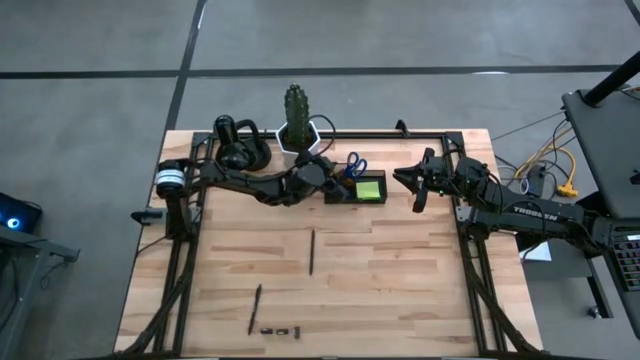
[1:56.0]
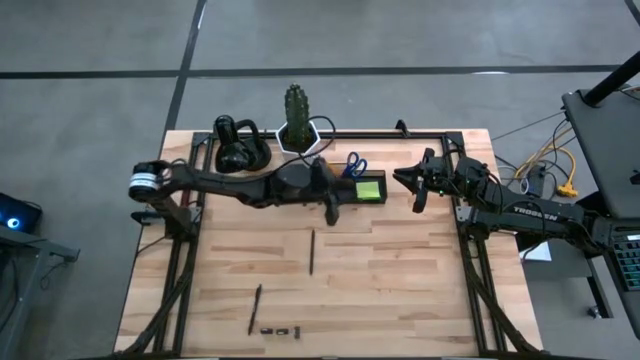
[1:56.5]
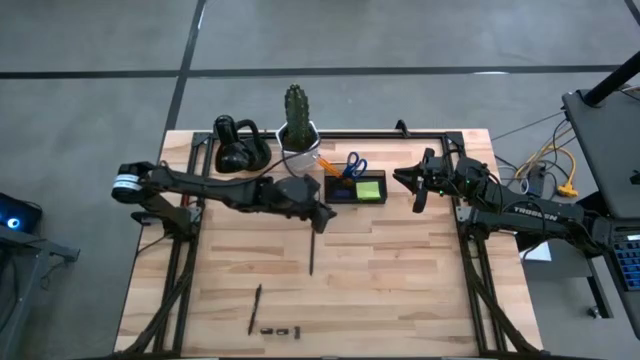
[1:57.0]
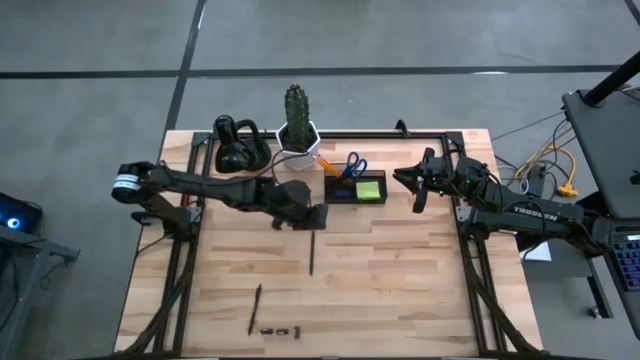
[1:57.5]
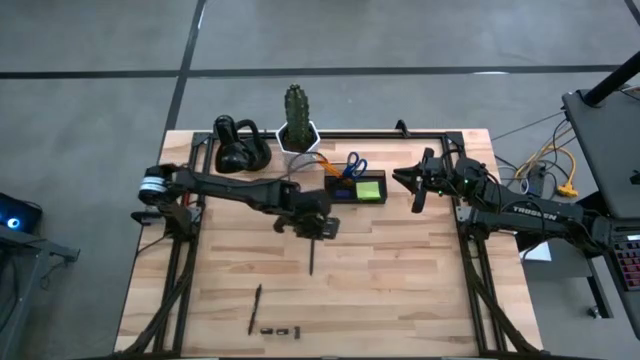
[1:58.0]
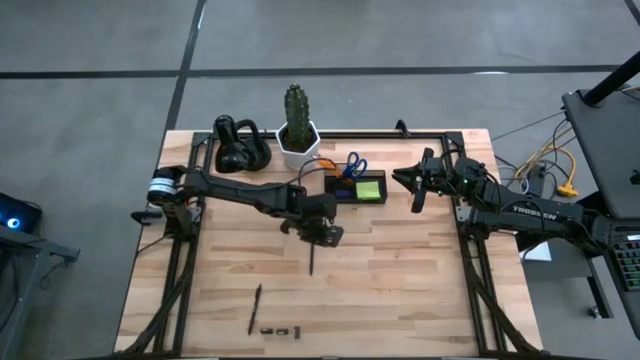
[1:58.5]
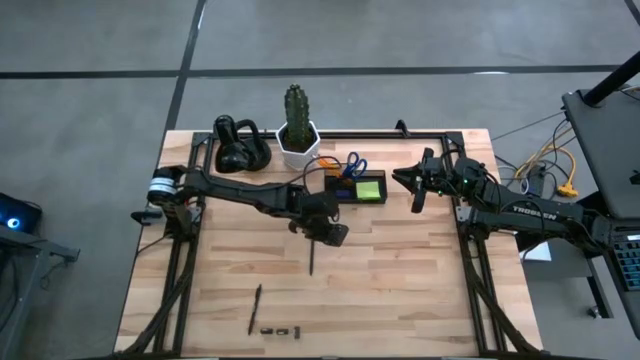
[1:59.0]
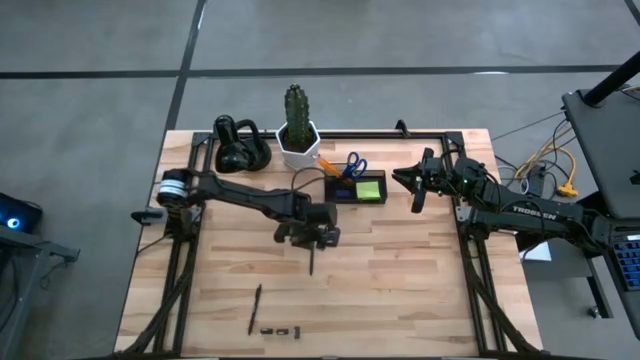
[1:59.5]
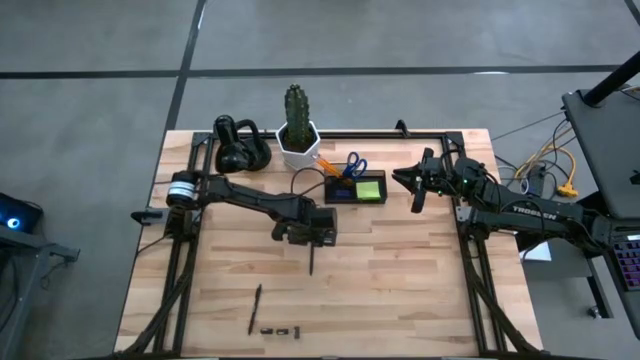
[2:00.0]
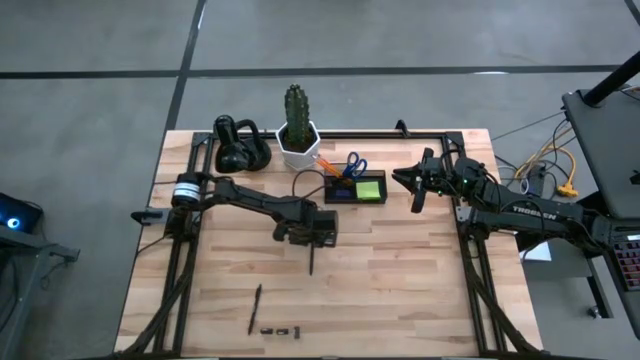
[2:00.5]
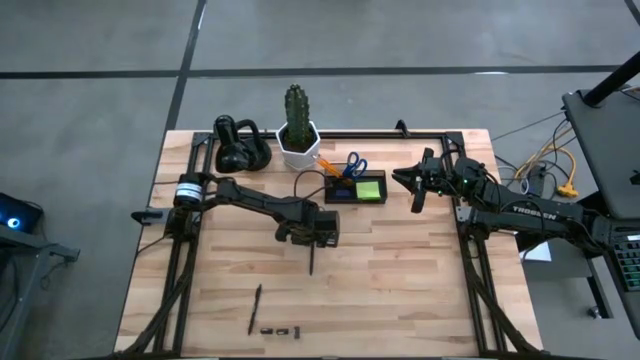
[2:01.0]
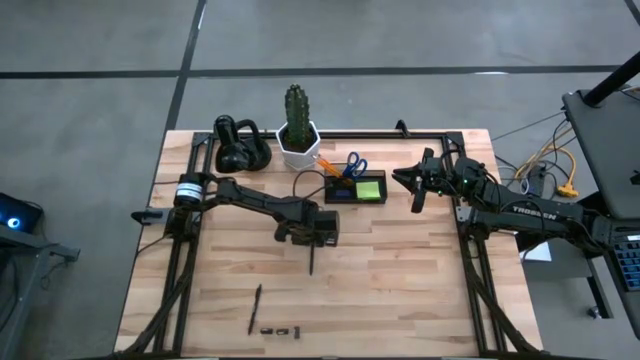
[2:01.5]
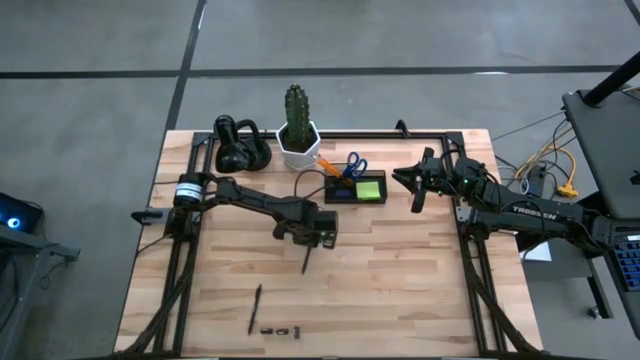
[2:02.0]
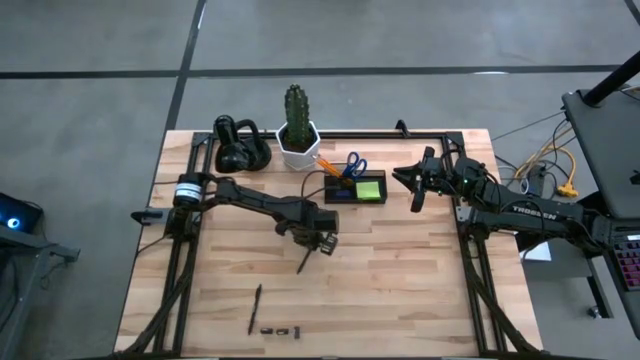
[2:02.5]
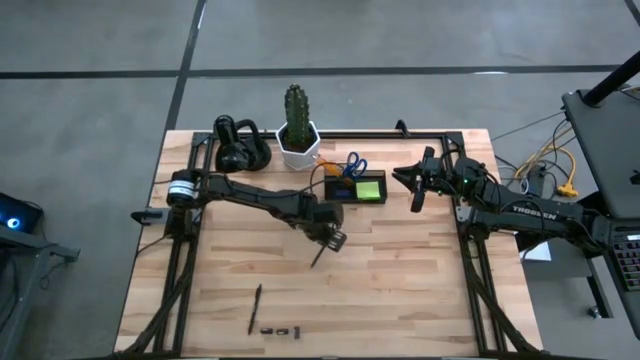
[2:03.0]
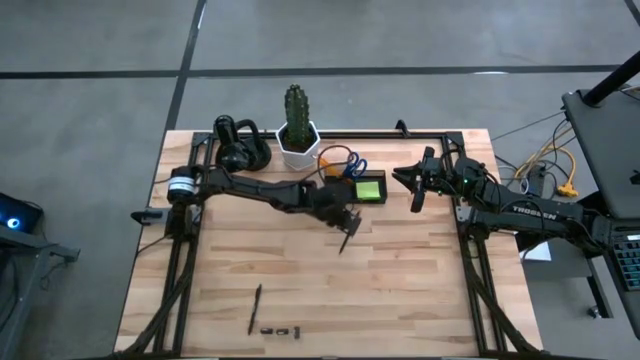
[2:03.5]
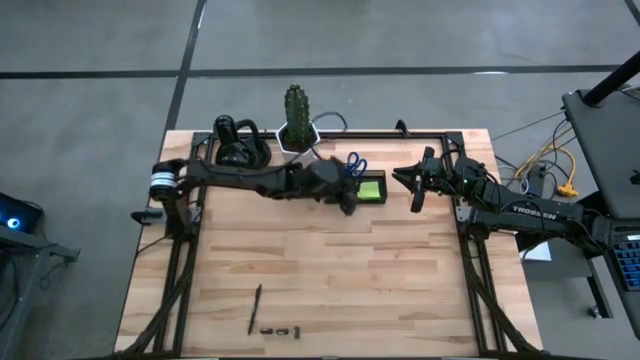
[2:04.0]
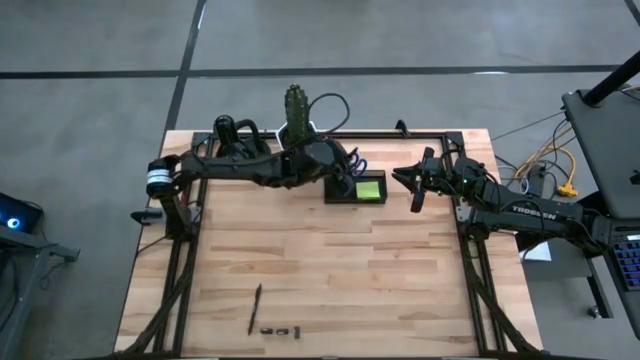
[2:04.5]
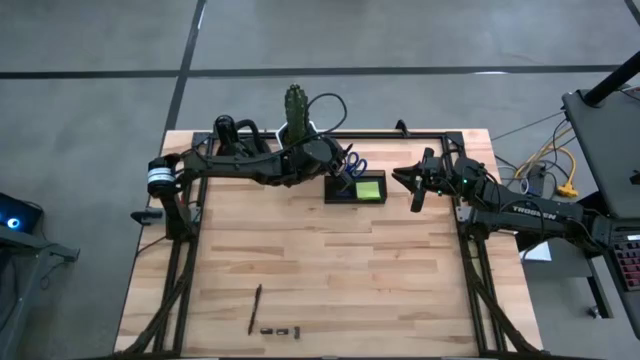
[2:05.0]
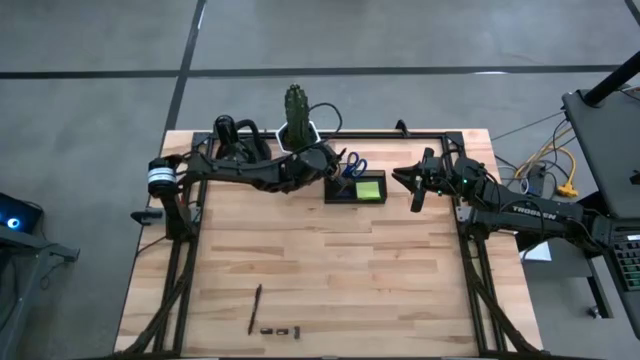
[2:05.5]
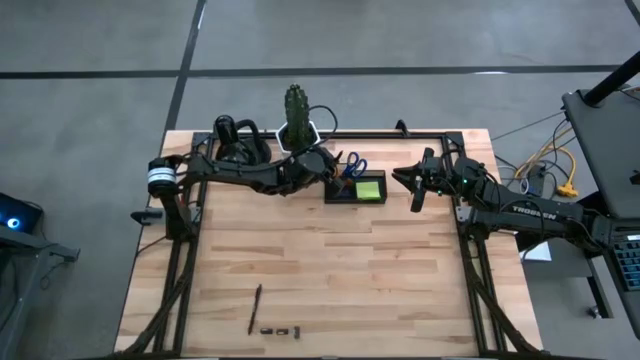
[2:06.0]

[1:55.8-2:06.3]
Task: Pick and place office supplies into organizer
Put the top pen into the left section of the desk organizer

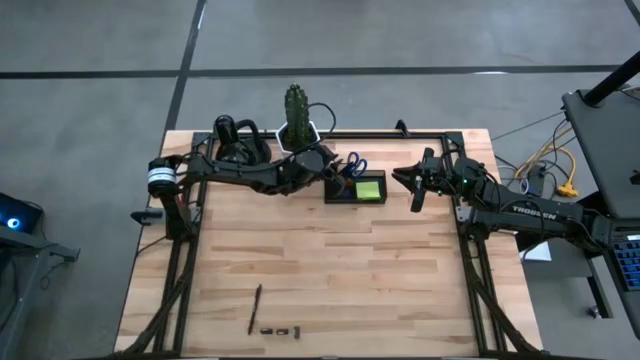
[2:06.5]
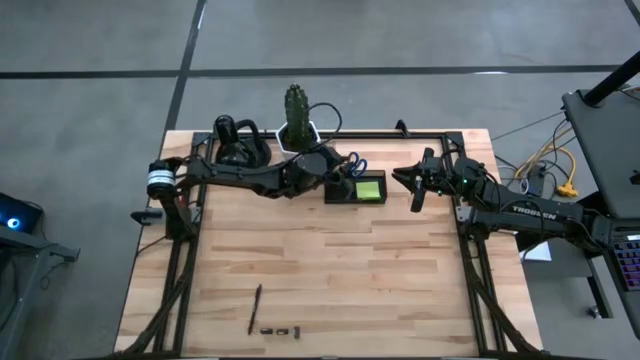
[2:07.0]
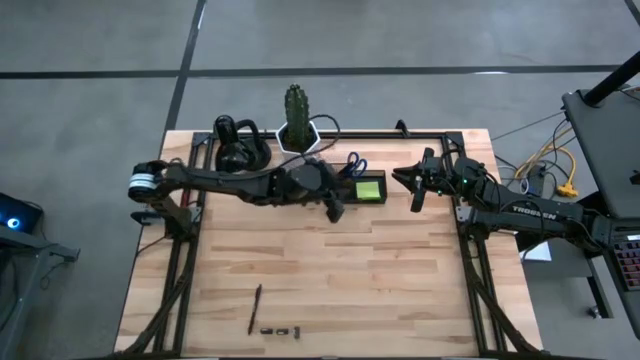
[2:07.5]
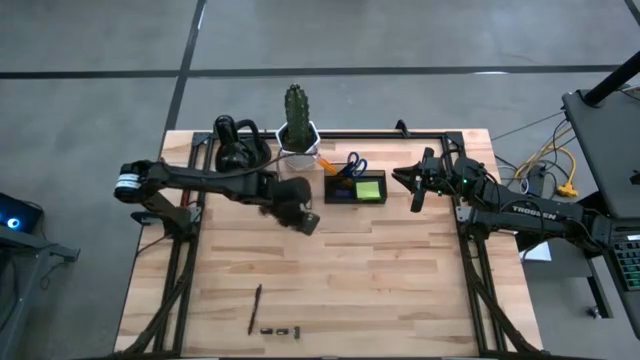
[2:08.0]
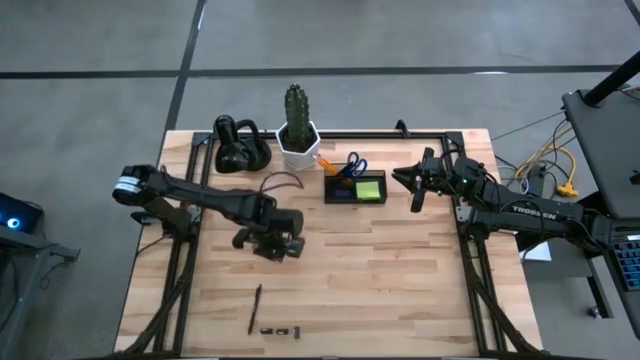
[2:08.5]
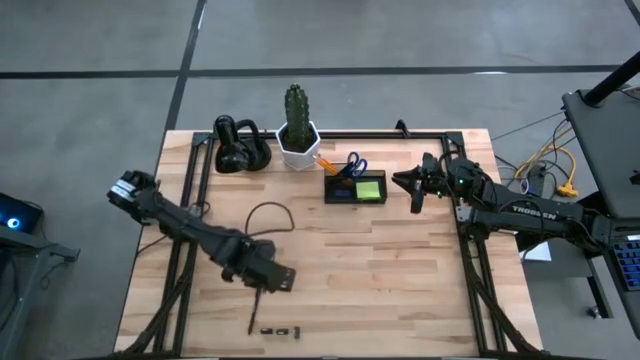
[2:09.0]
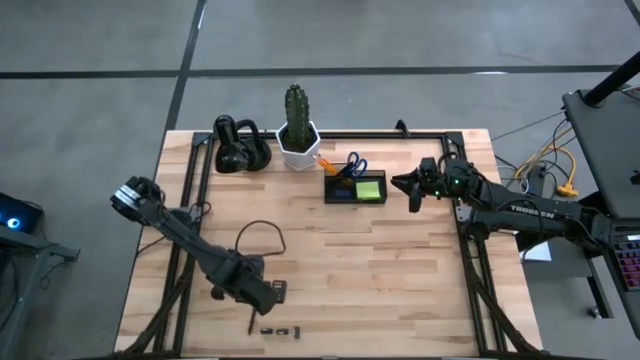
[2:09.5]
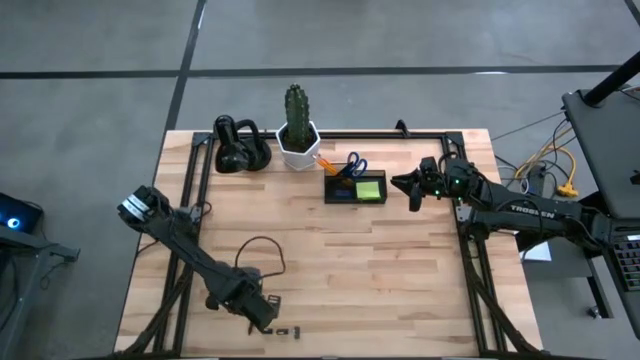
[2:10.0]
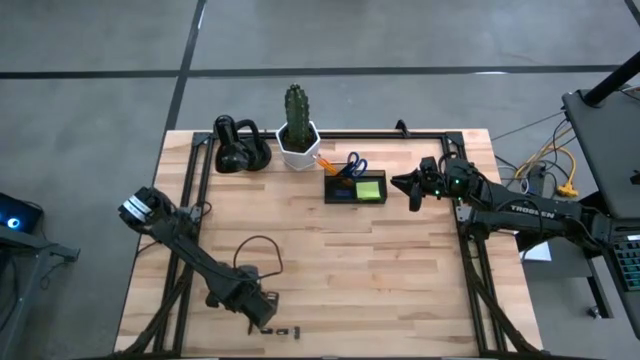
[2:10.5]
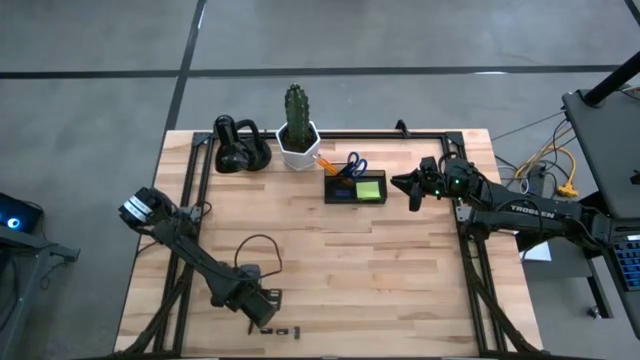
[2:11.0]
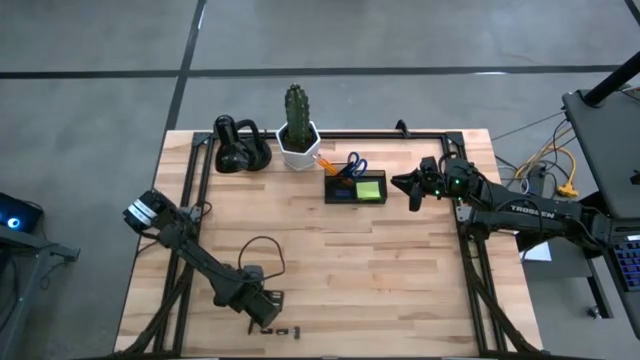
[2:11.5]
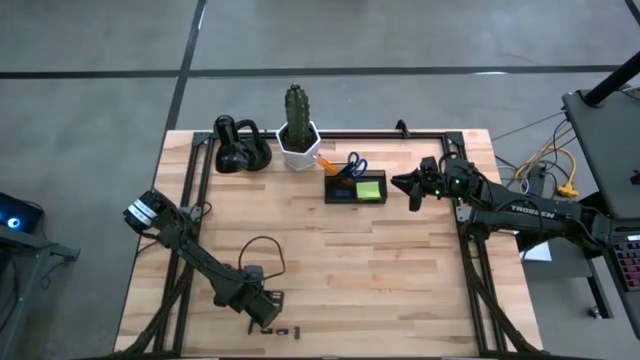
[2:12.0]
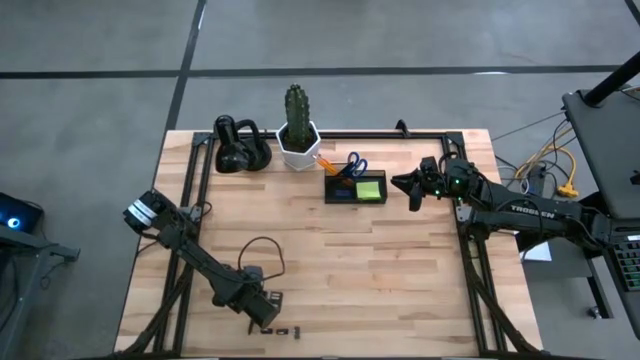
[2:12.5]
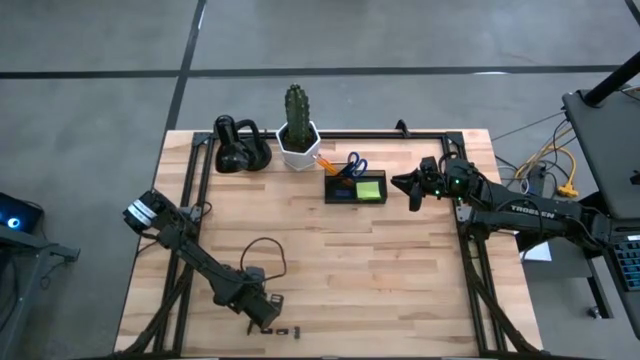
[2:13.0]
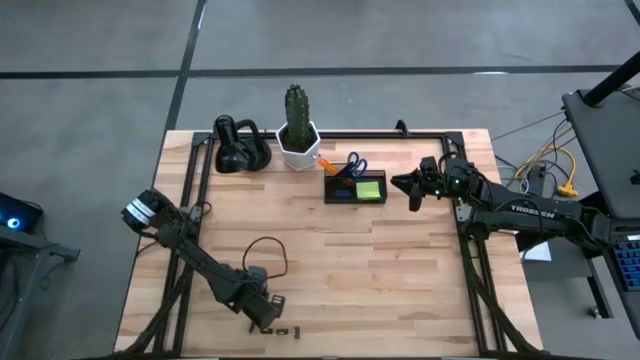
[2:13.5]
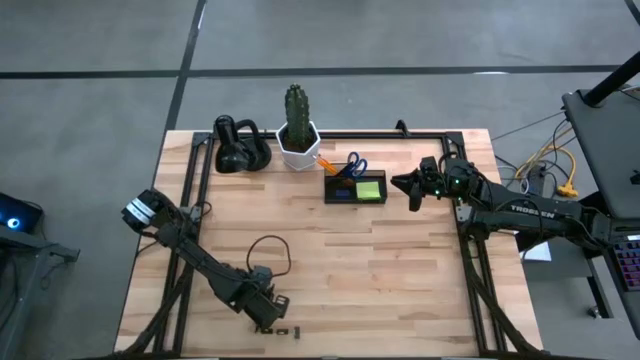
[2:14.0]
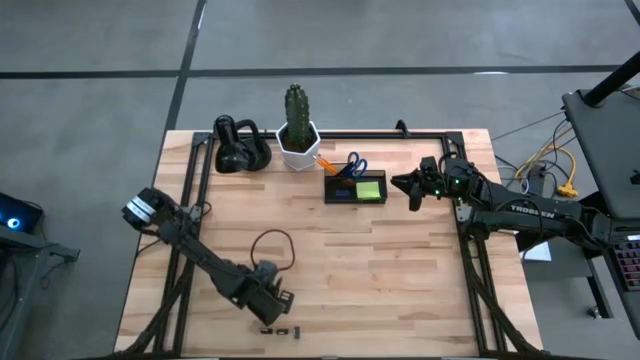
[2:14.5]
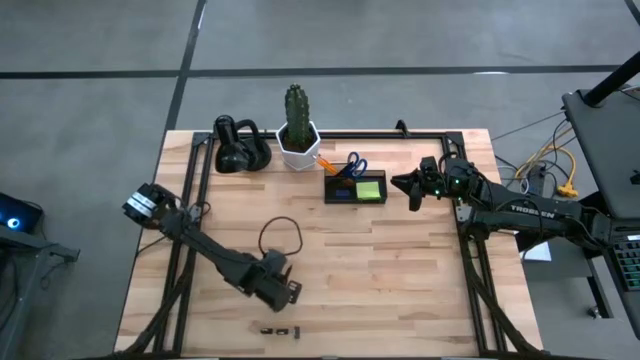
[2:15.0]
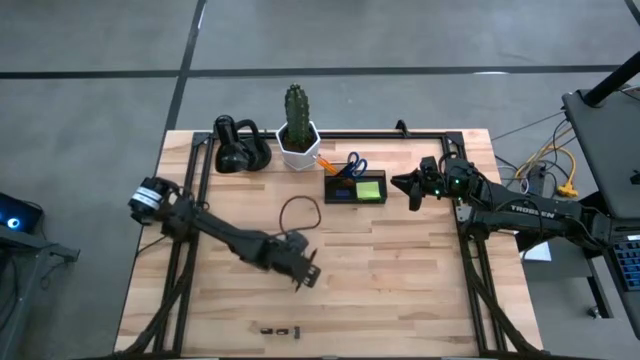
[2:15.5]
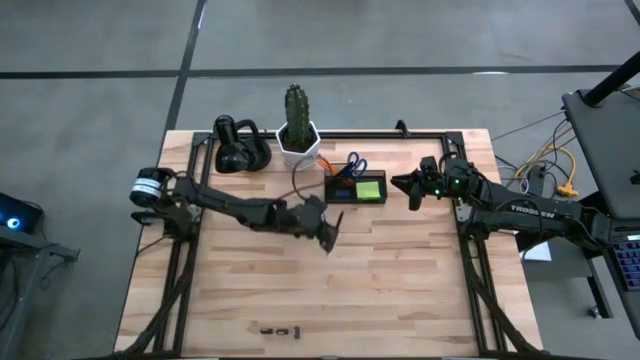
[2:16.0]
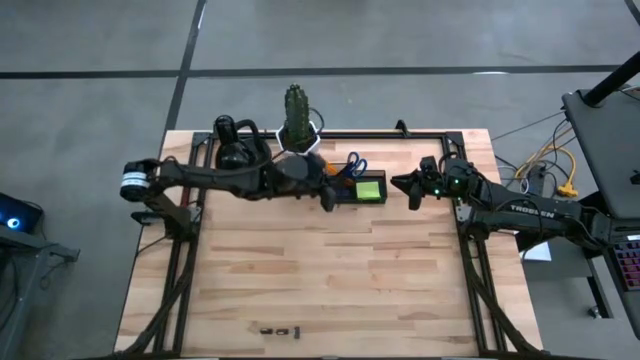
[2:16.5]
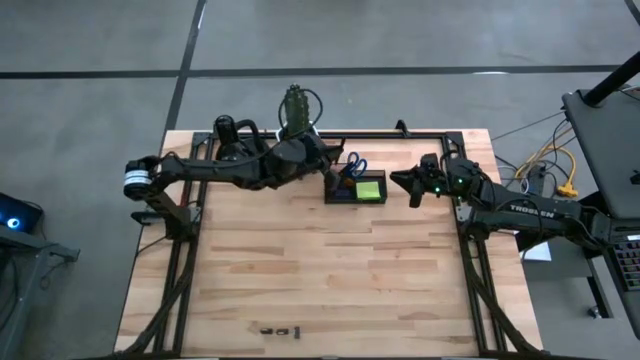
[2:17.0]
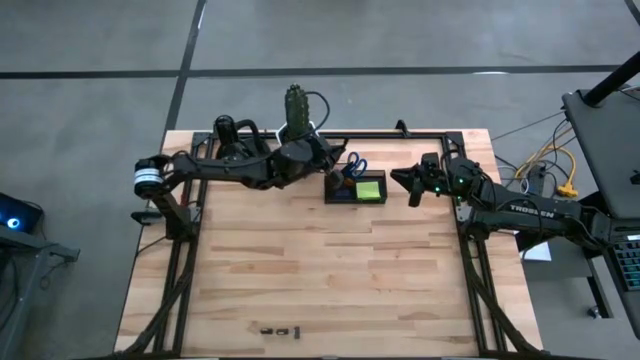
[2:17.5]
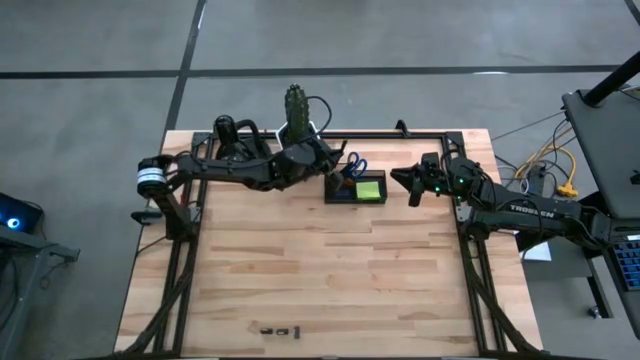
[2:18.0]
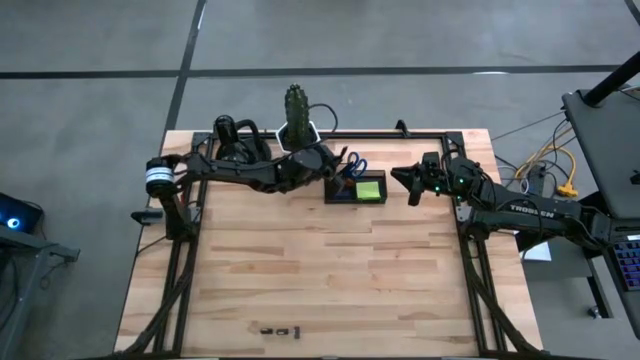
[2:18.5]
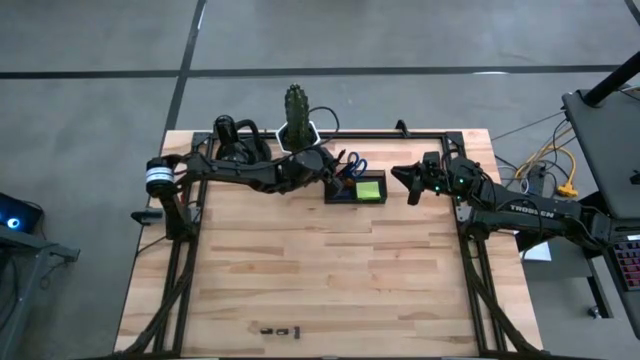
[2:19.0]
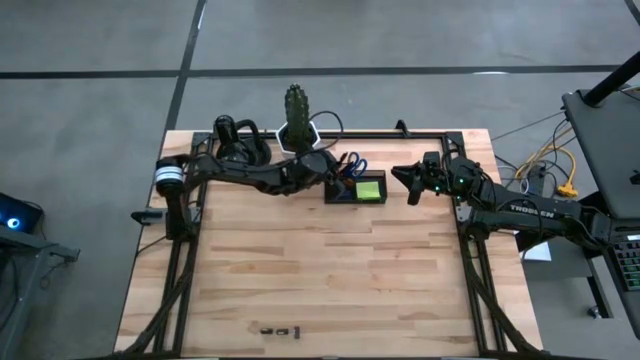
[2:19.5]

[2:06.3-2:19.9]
Put the pen into the left section of the desk organizer
